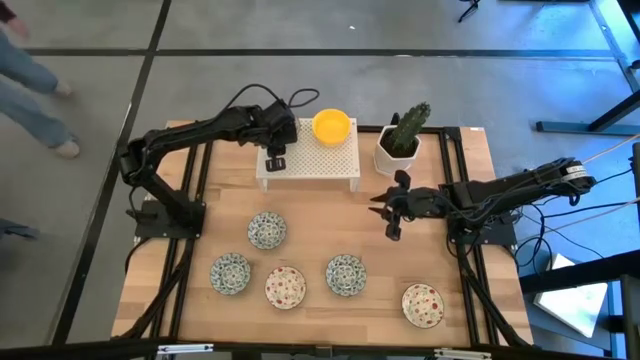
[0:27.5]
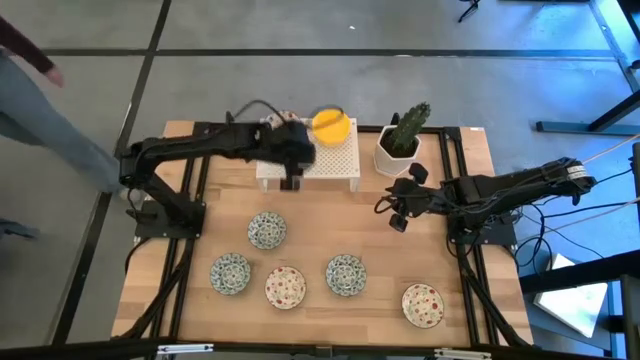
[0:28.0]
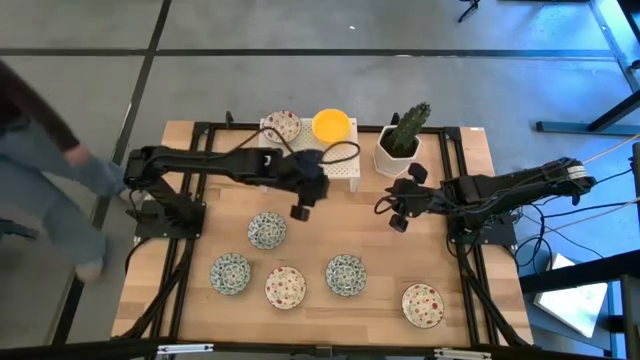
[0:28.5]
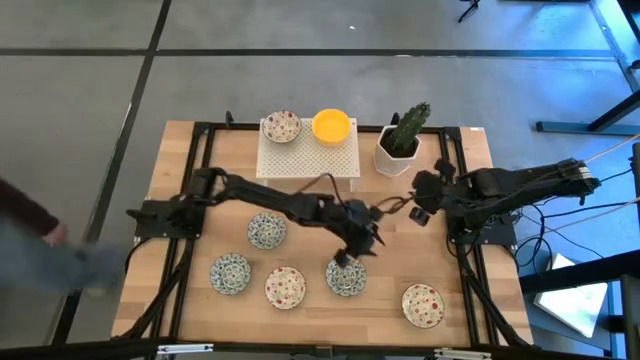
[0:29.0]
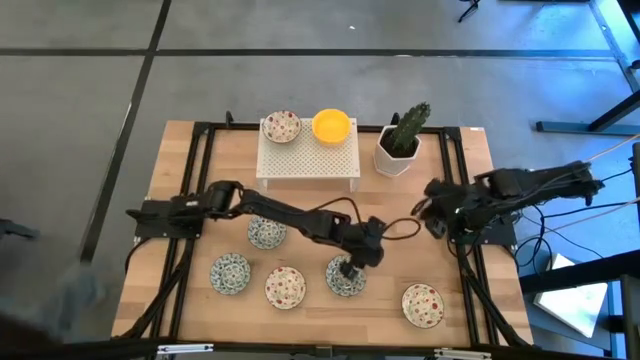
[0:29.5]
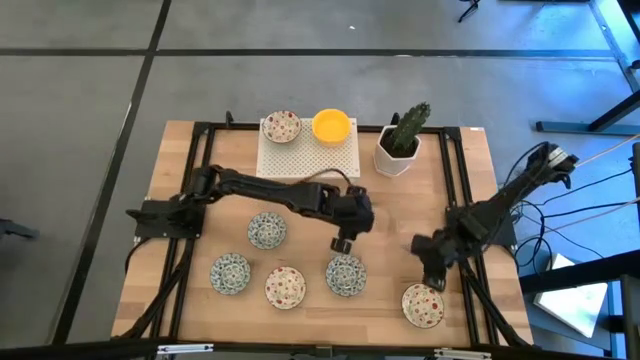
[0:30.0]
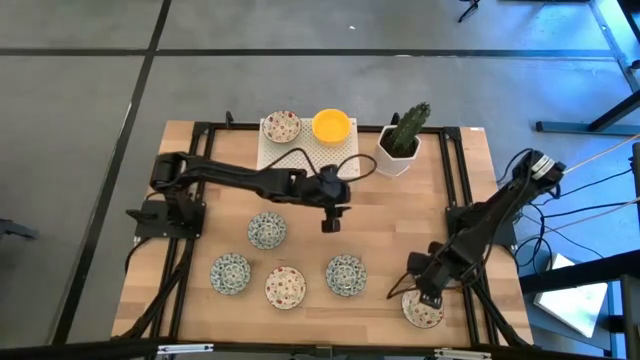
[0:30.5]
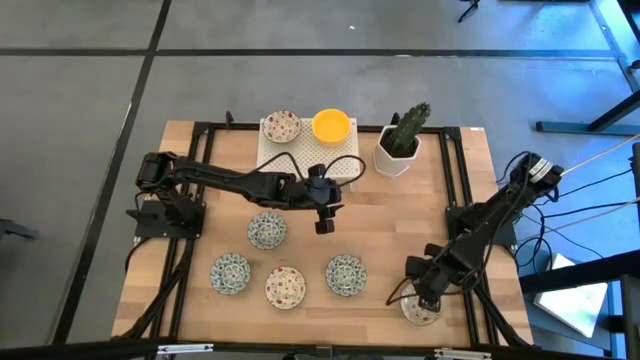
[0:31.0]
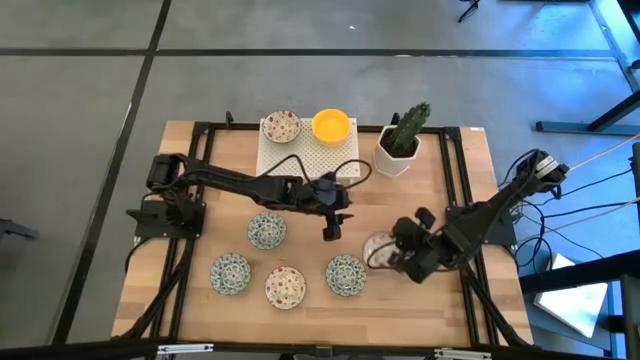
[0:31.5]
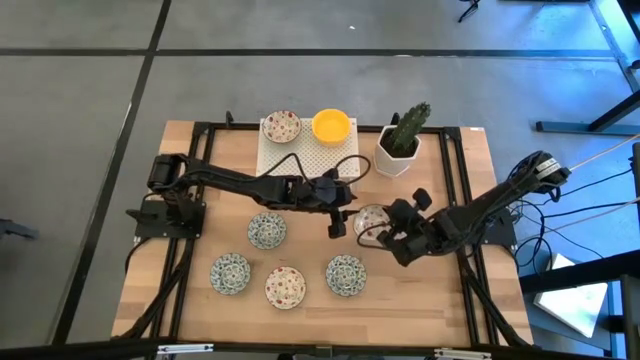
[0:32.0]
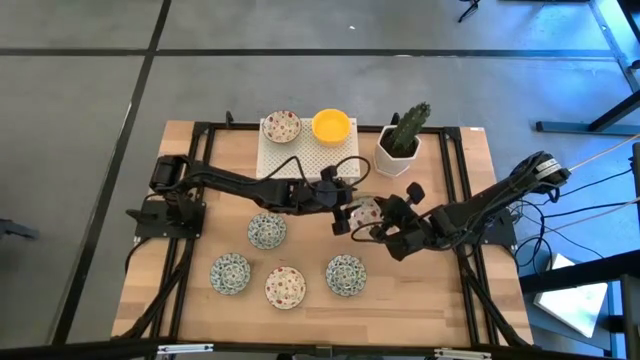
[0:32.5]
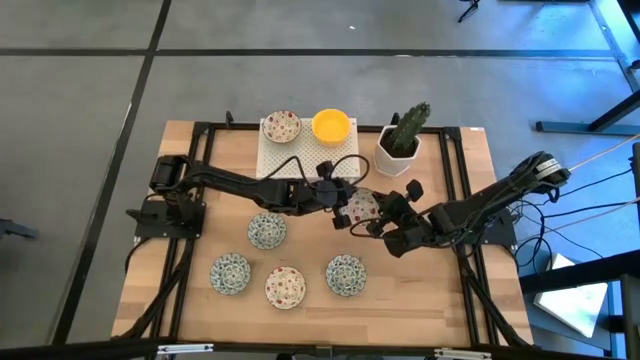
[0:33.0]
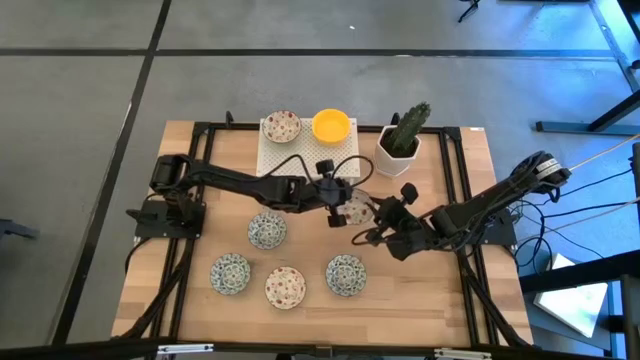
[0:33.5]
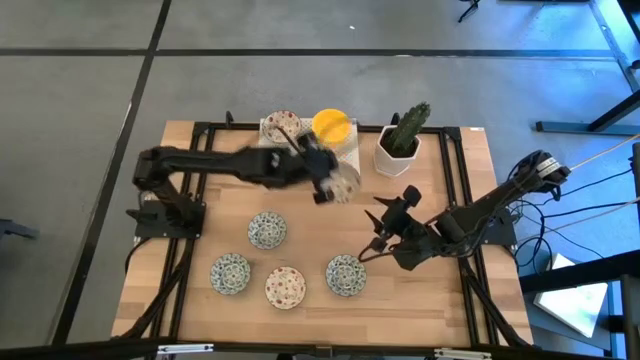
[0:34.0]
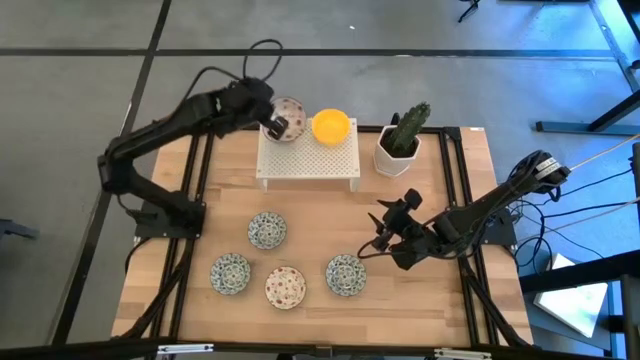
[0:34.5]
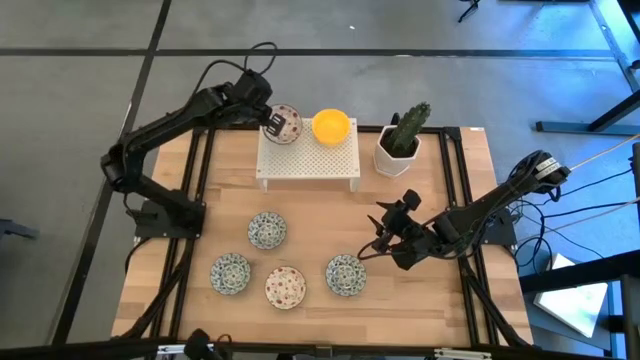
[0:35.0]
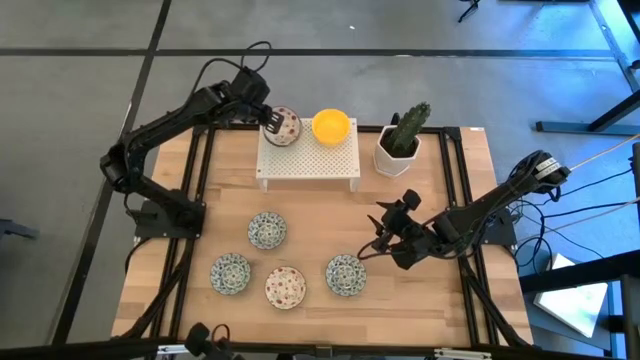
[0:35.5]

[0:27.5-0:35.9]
Task: Pick & Place Mini bowls
Stack the right green patterned bowl on top of the green patterned bowl on the shelf

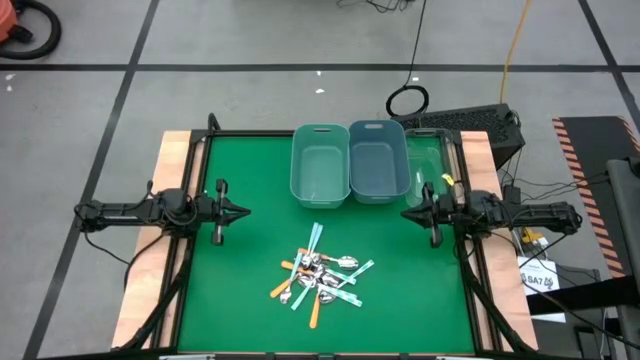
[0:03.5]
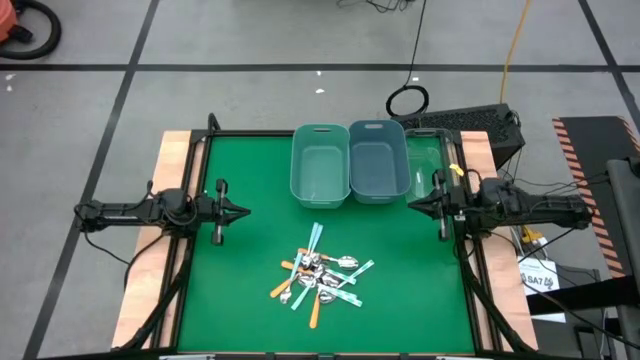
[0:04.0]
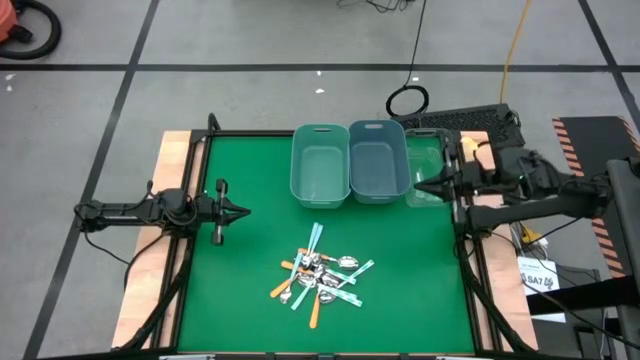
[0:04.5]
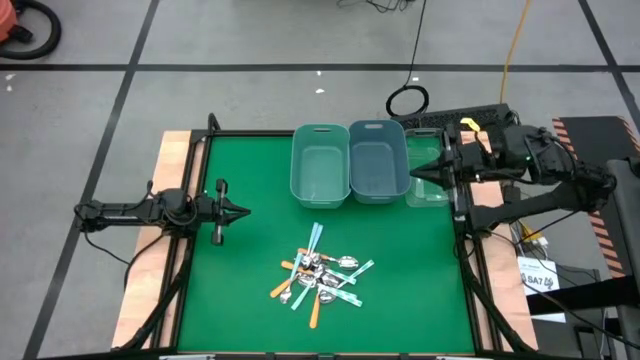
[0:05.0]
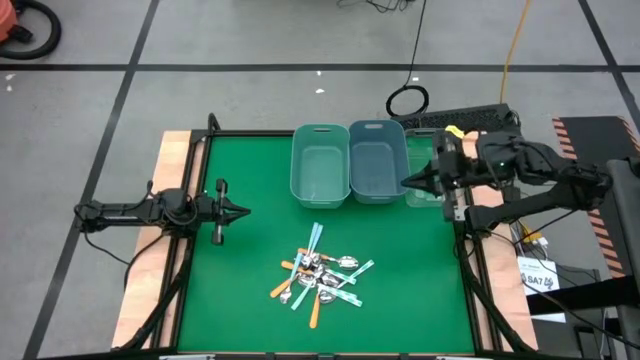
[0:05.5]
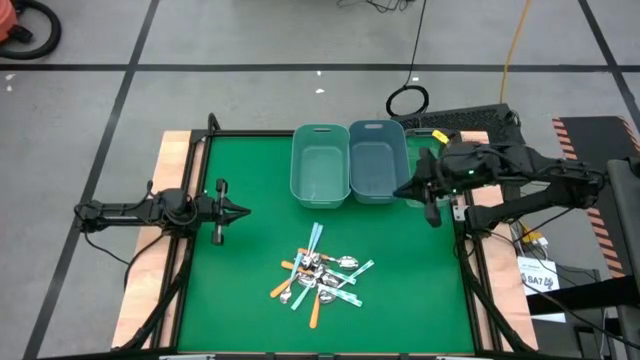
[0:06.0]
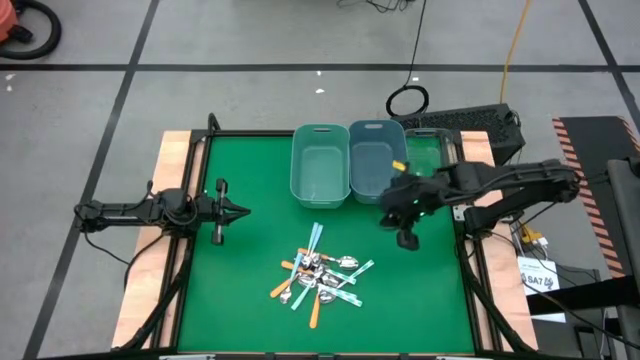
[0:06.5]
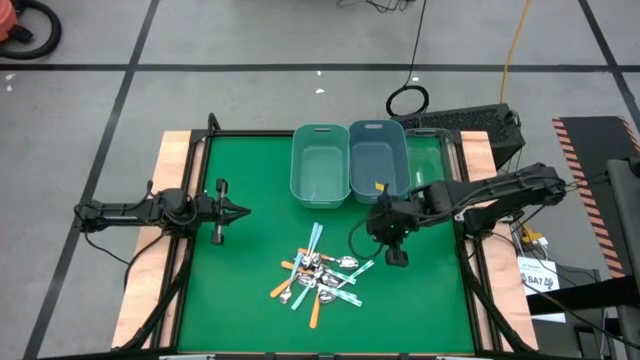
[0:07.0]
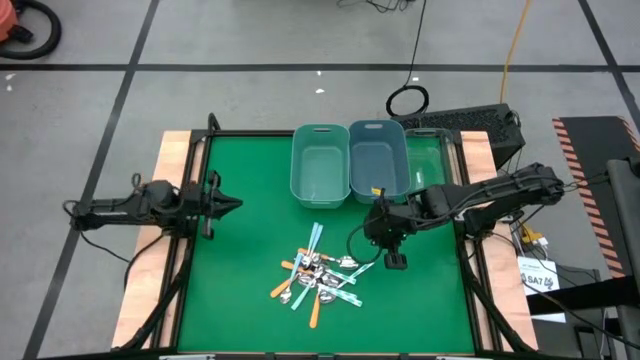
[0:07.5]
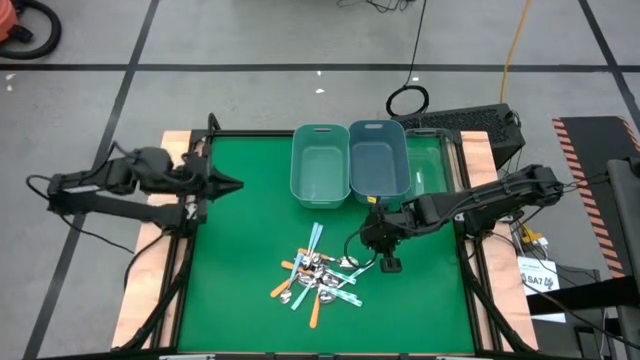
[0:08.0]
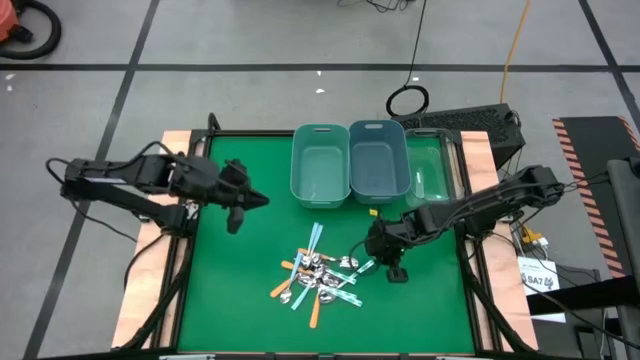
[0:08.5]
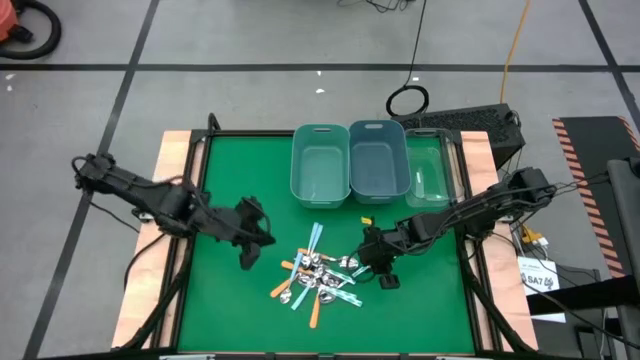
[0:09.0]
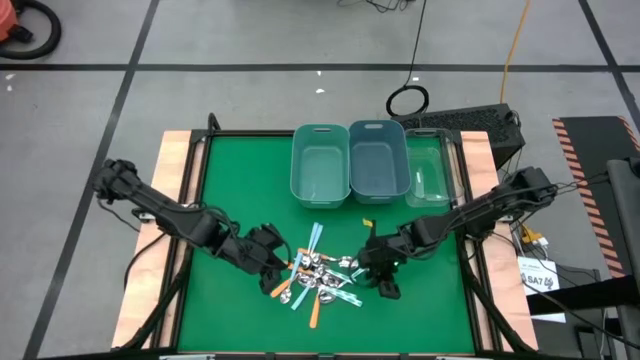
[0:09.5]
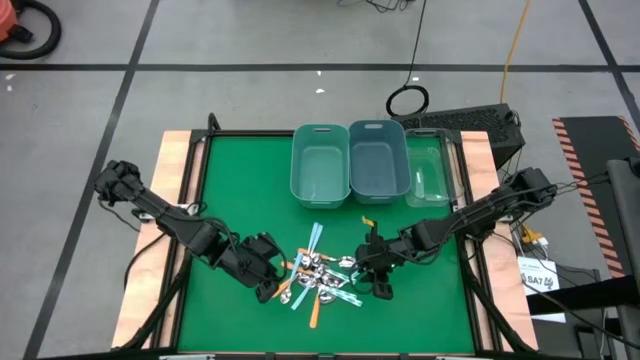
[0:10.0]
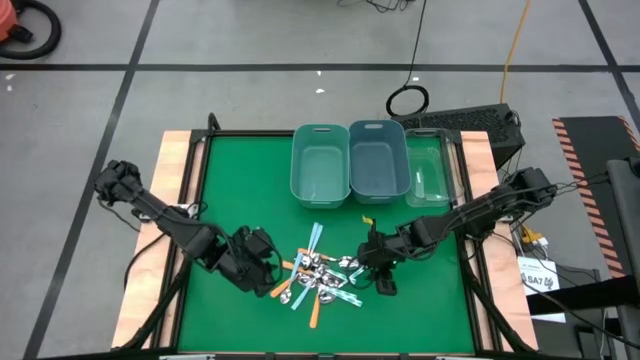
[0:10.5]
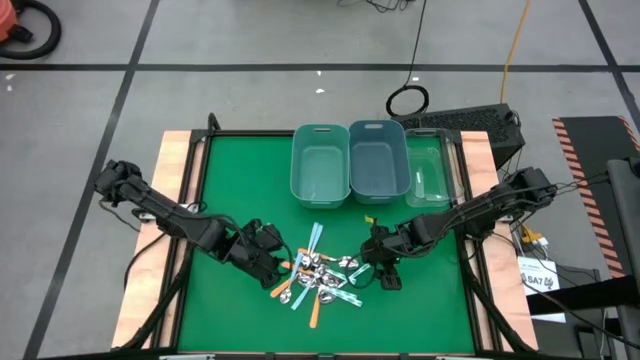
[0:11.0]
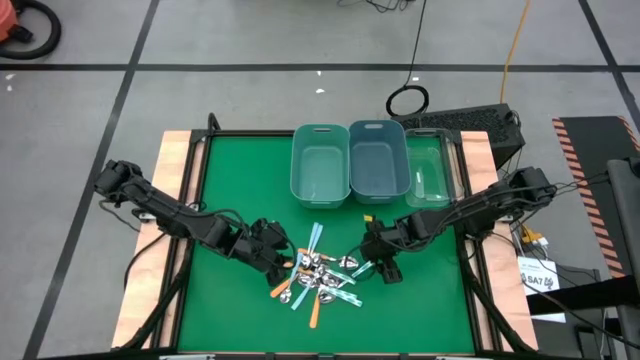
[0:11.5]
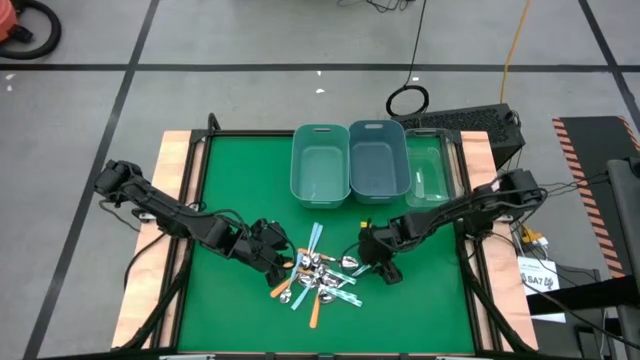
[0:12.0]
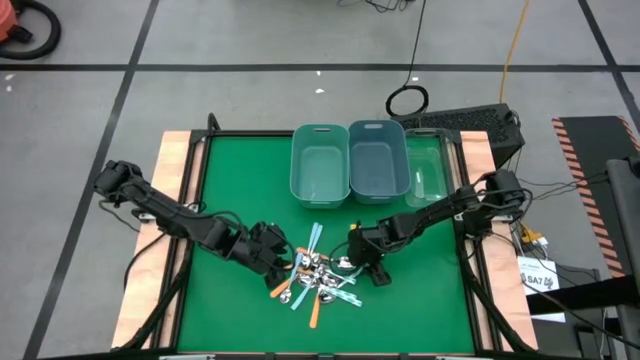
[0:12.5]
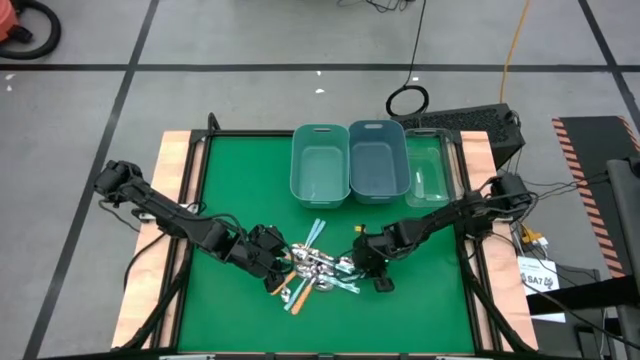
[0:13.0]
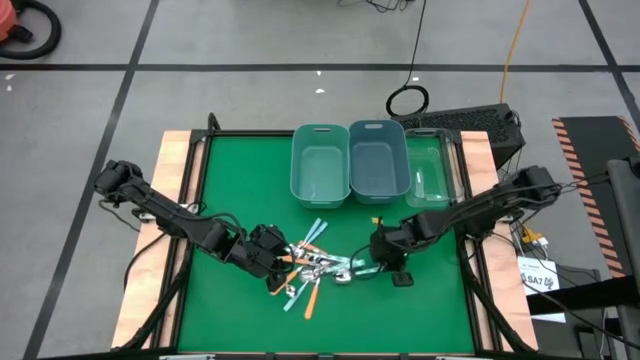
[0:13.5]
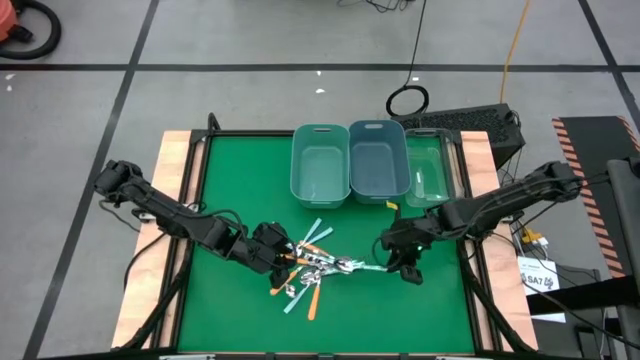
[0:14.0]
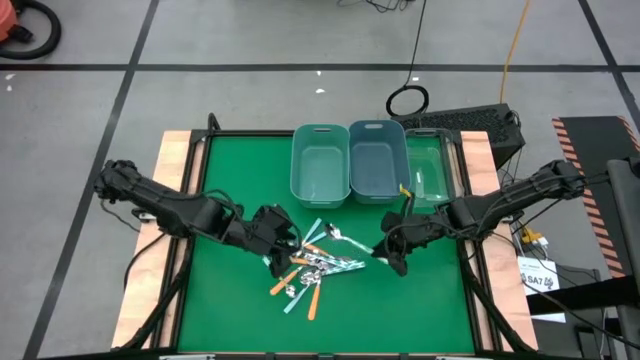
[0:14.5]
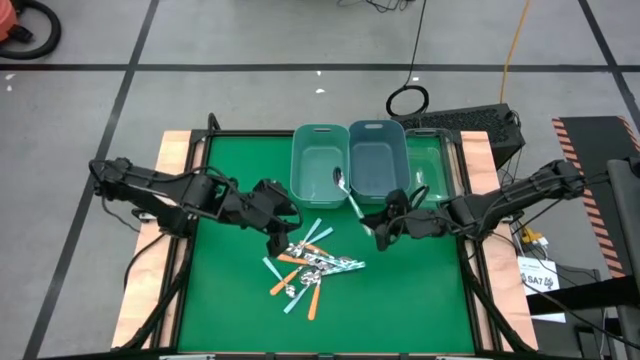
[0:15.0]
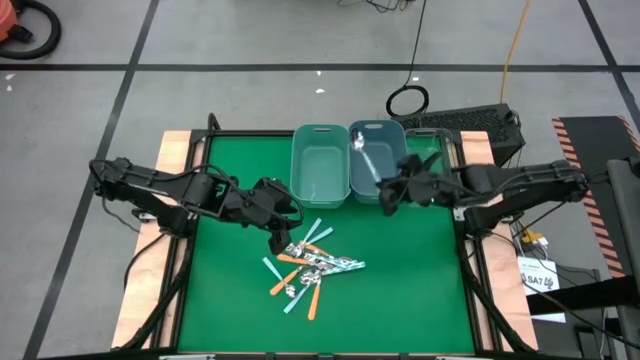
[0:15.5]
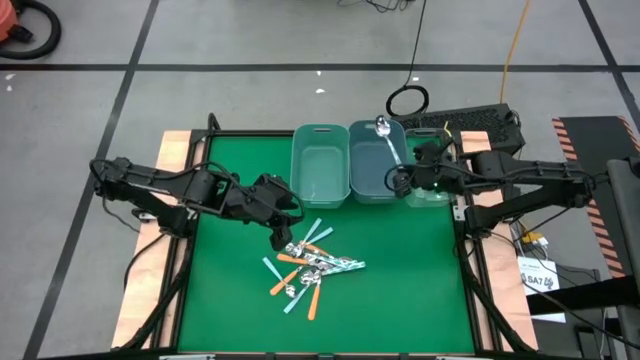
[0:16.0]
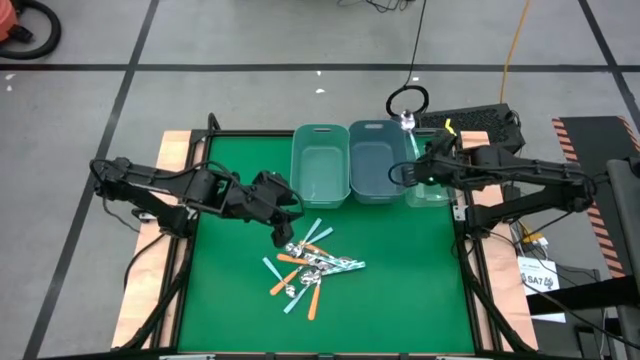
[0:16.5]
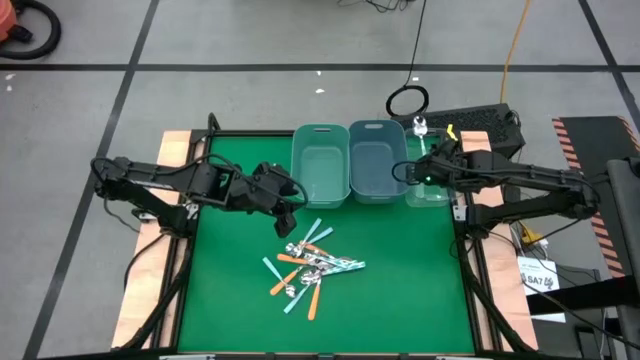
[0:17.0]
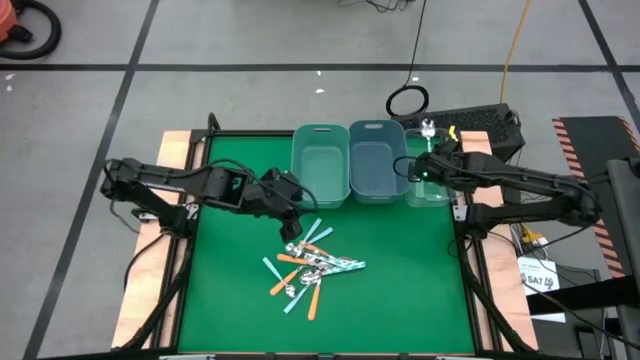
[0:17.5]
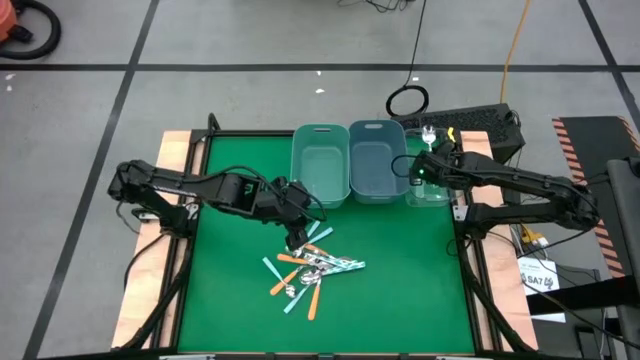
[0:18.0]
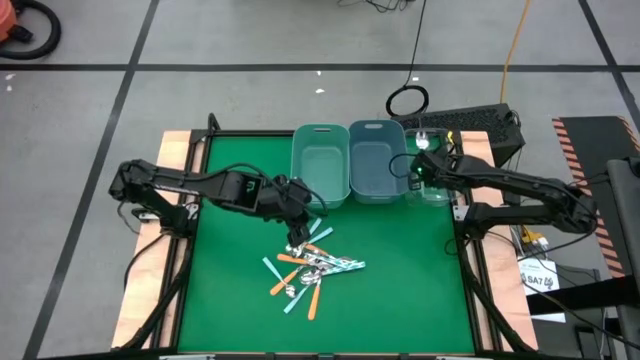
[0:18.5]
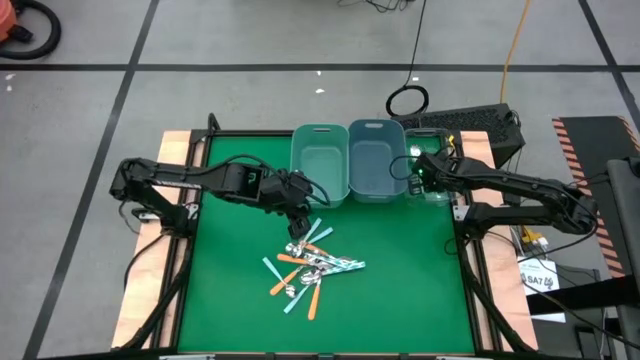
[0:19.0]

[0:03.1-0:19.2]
Task: Sort silverware by color (type)
Put the green spoon into the transparent bin
